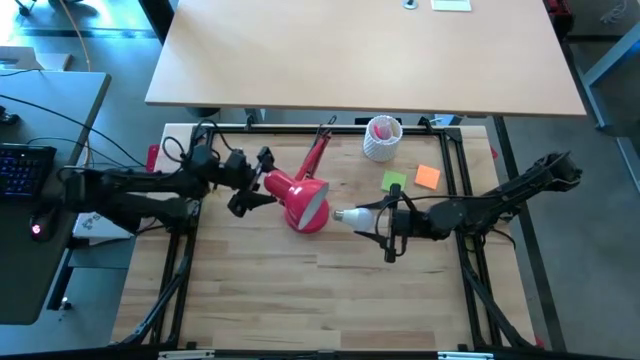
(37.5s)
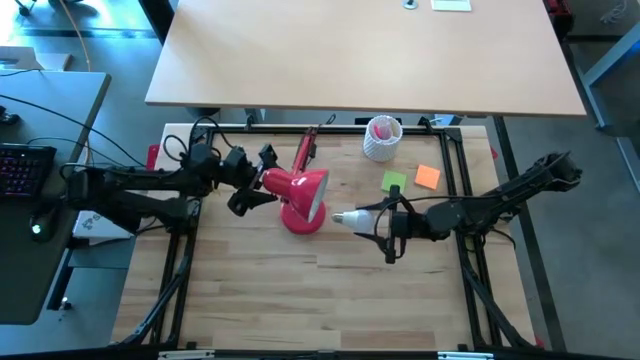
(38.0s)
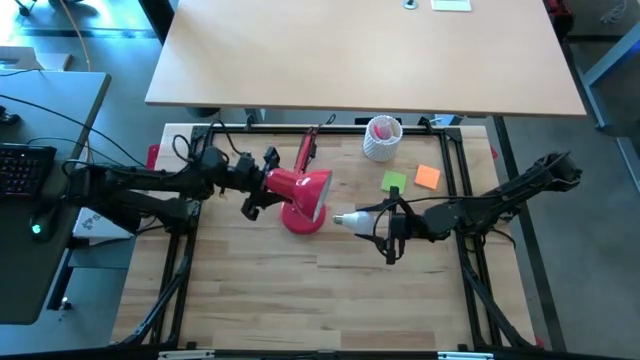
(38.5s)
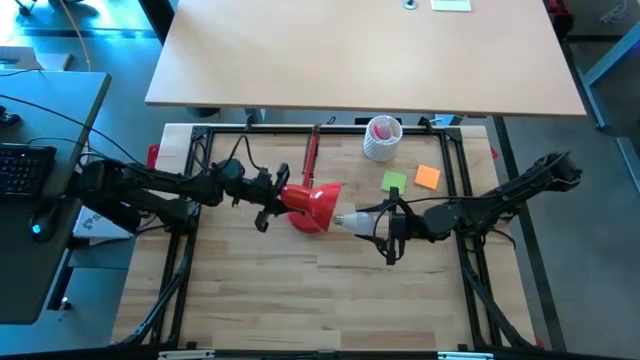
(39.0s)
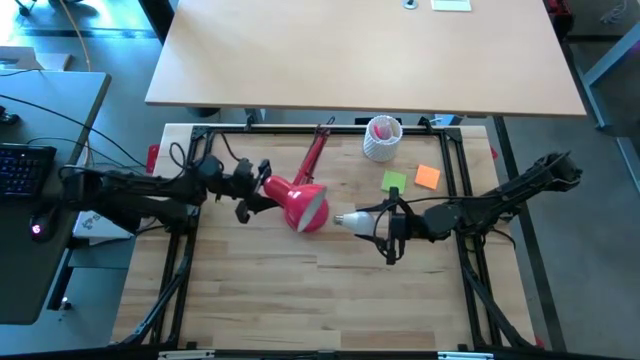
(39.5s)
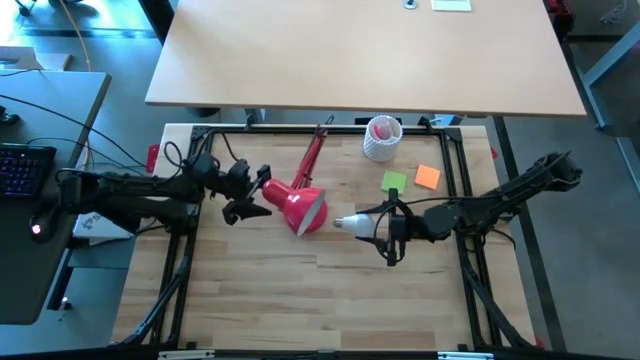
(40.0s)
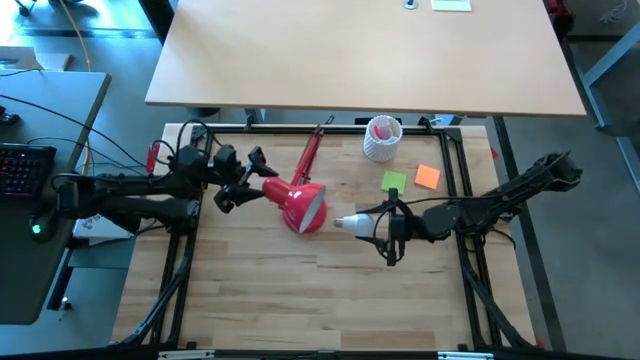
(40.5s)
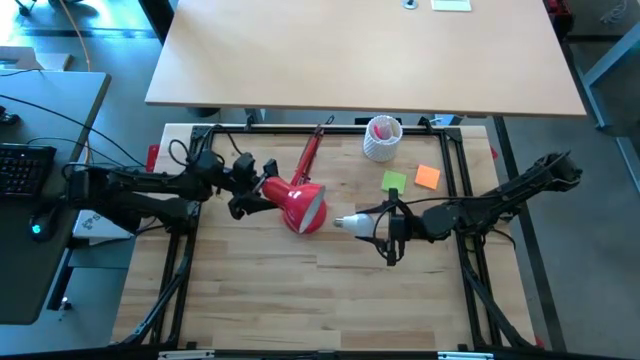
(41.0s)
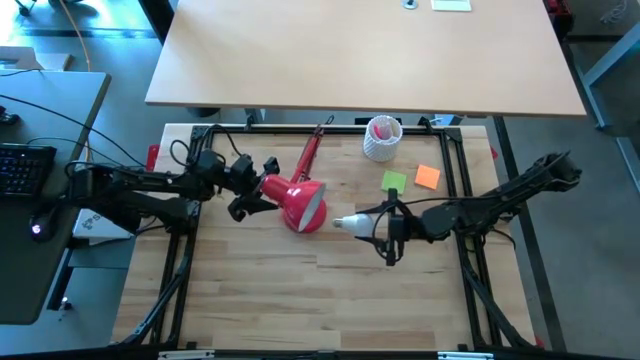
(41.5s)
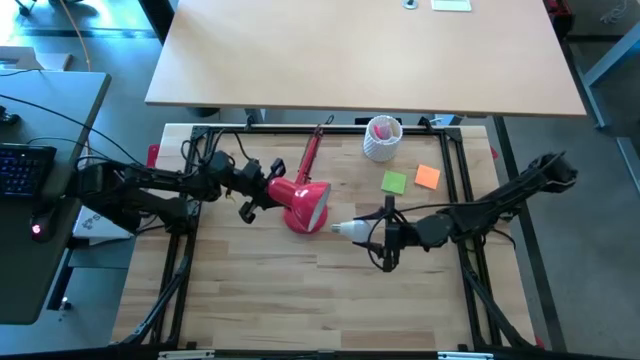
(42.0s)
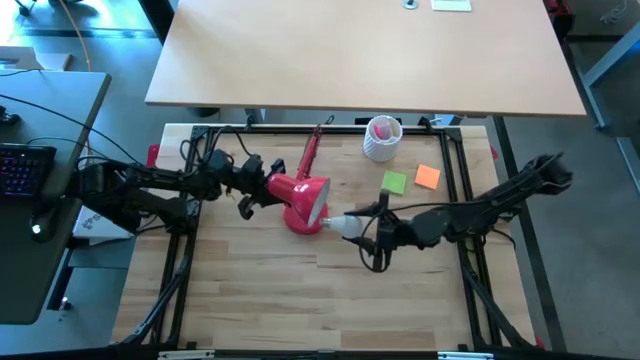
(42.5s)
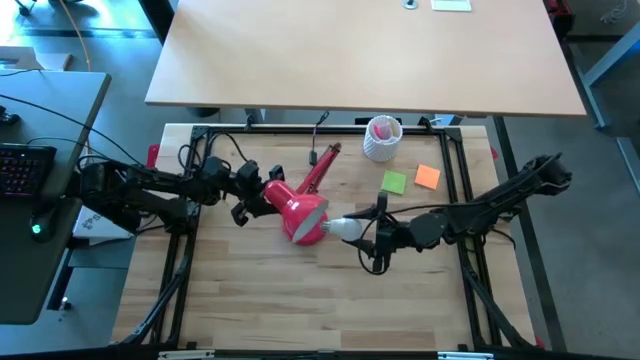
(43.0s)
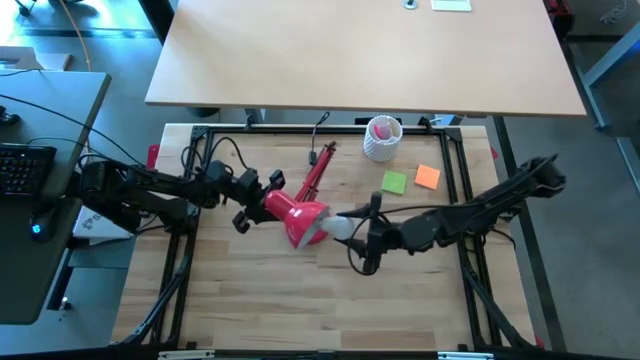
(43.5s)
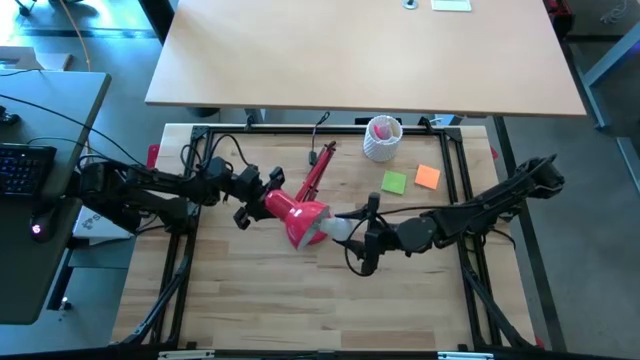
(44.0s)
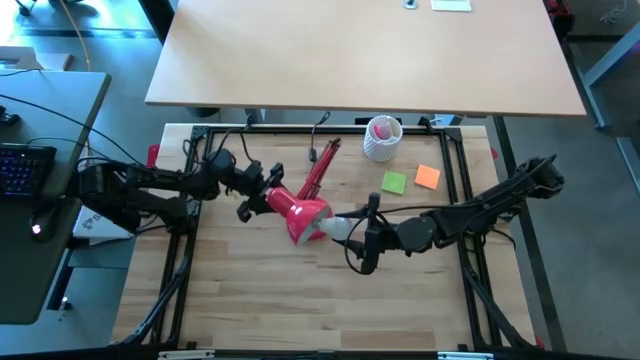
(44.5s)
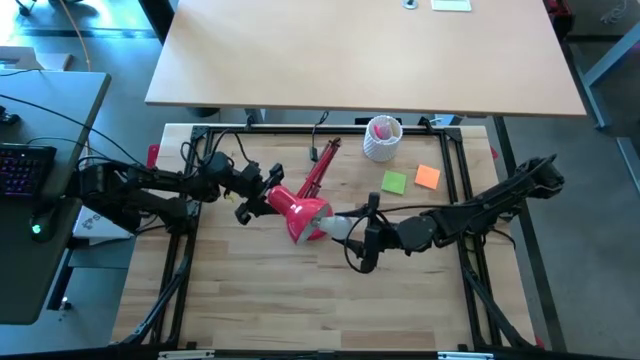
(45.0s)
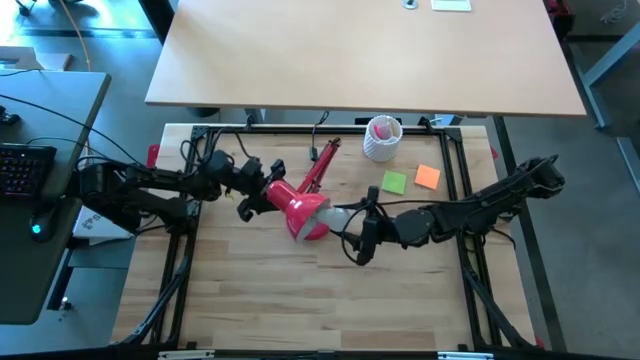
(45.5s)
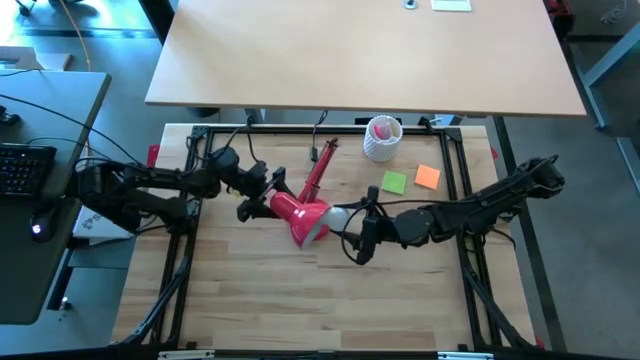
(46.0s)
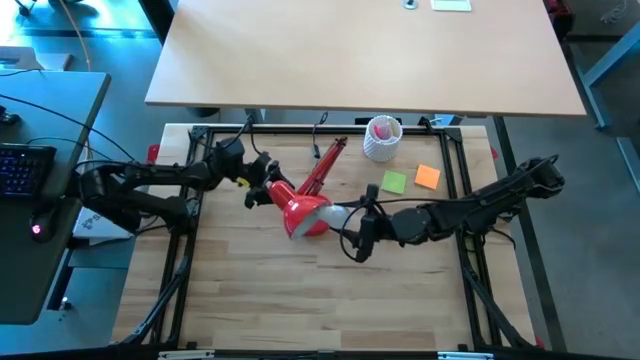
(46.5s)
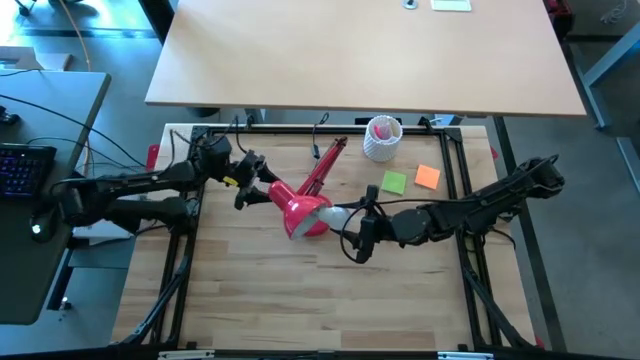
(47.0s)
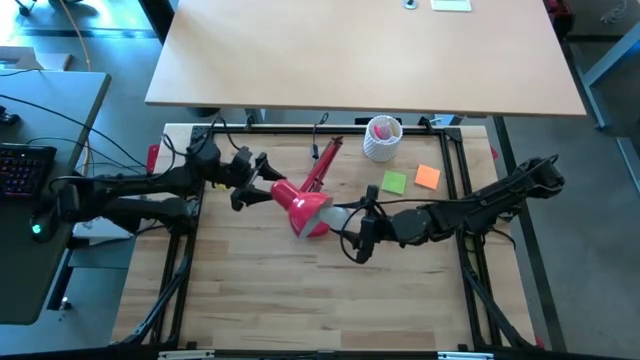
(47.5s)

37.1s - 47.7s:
Task: Screw lightbulb
Insert the white lightbulb into the red lamp

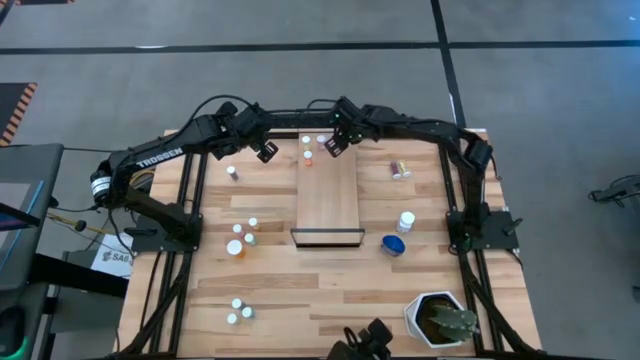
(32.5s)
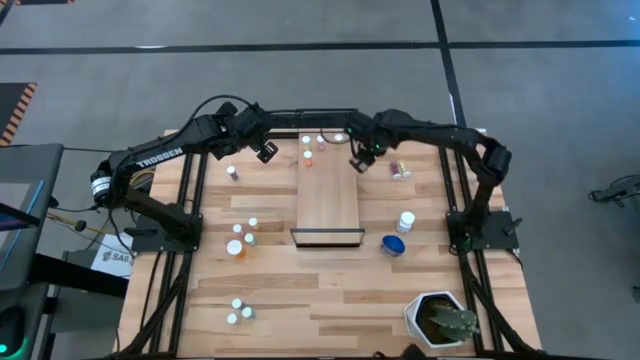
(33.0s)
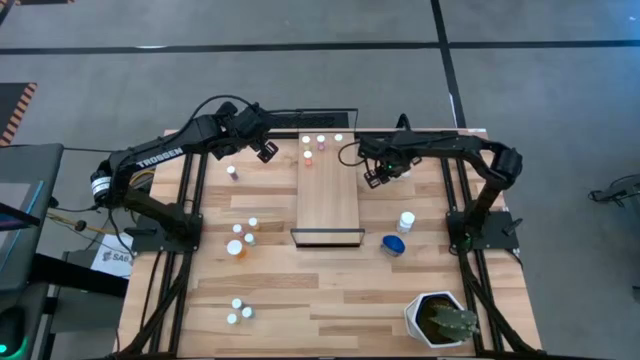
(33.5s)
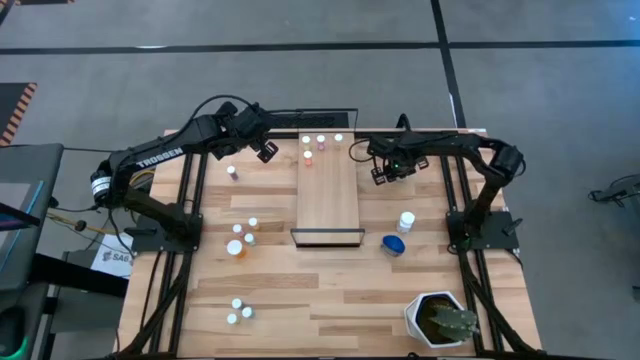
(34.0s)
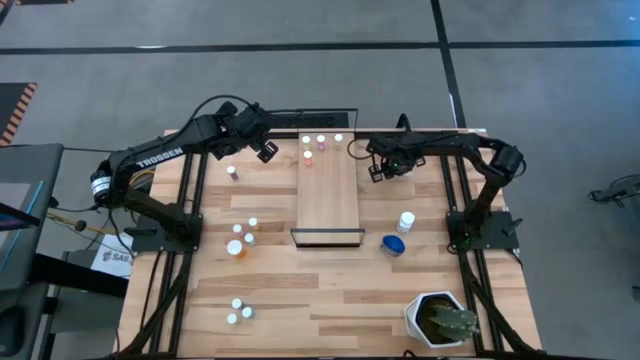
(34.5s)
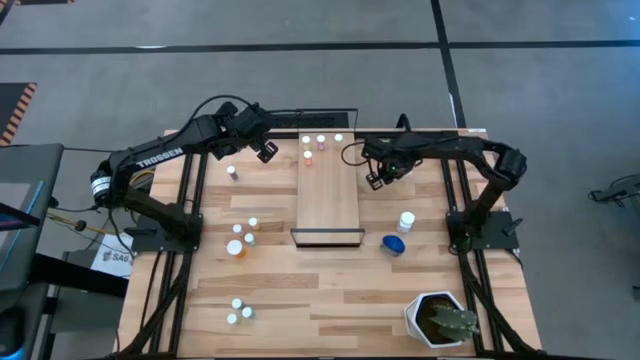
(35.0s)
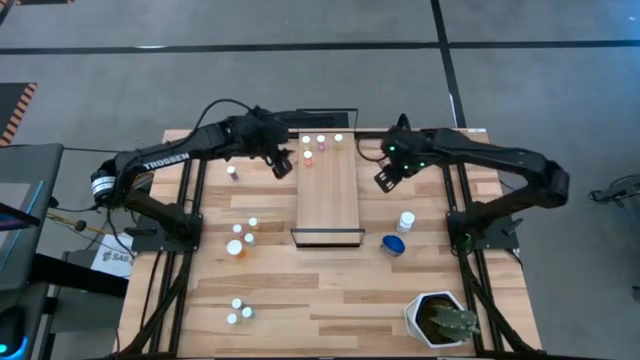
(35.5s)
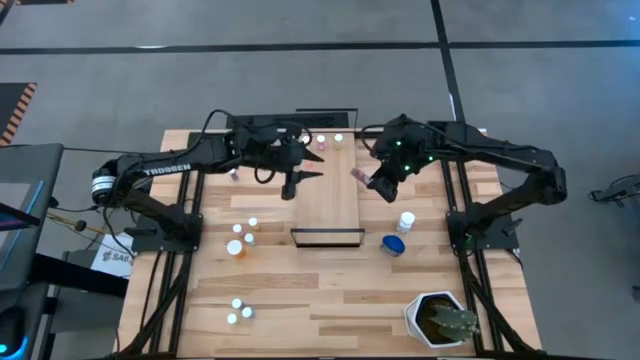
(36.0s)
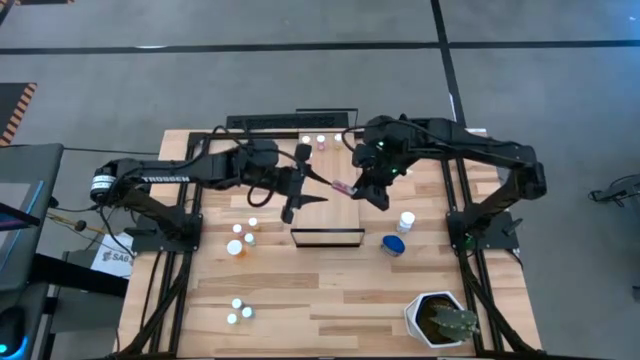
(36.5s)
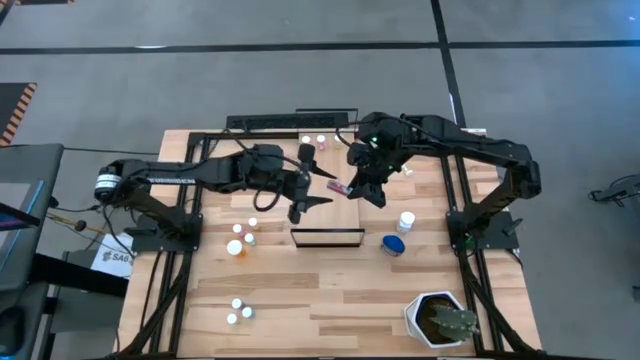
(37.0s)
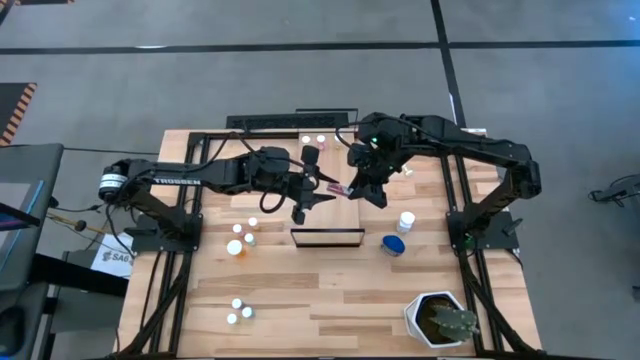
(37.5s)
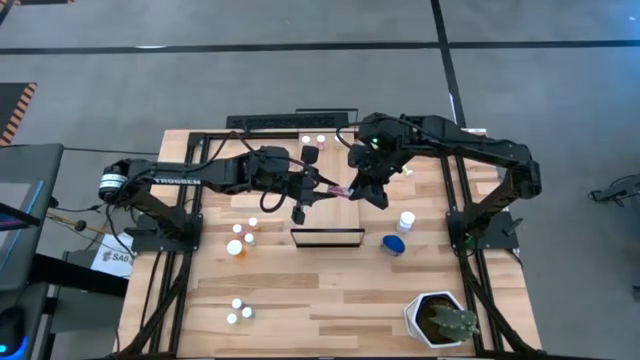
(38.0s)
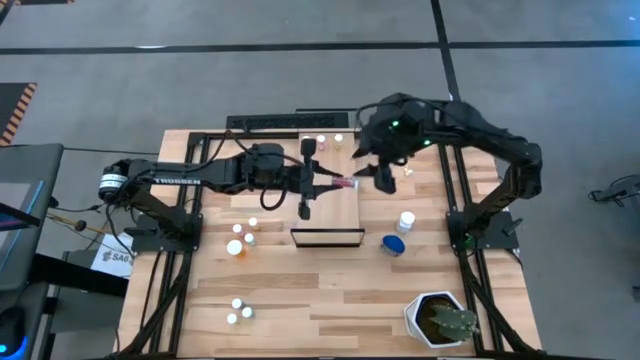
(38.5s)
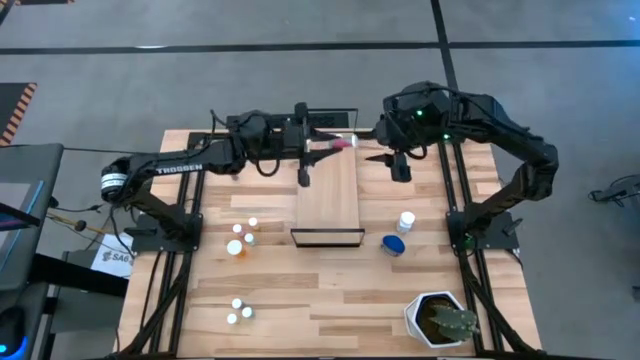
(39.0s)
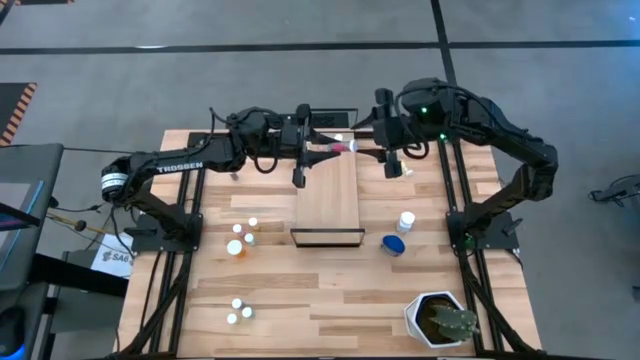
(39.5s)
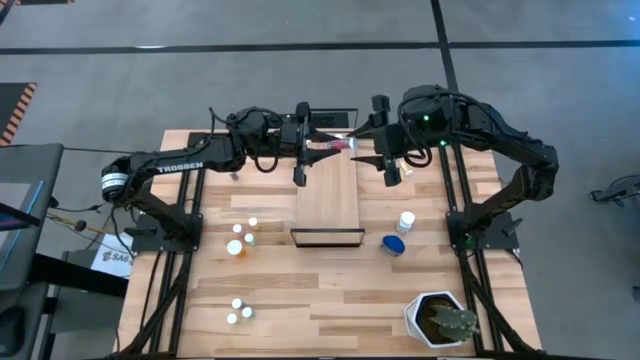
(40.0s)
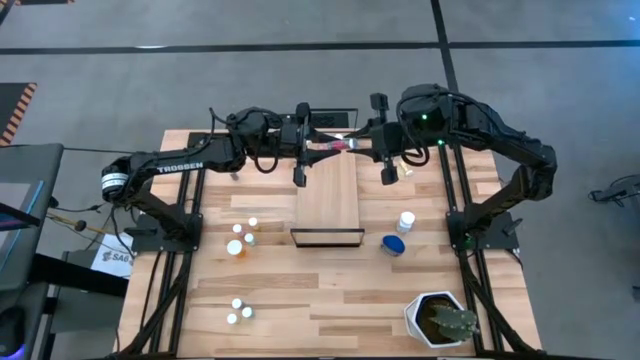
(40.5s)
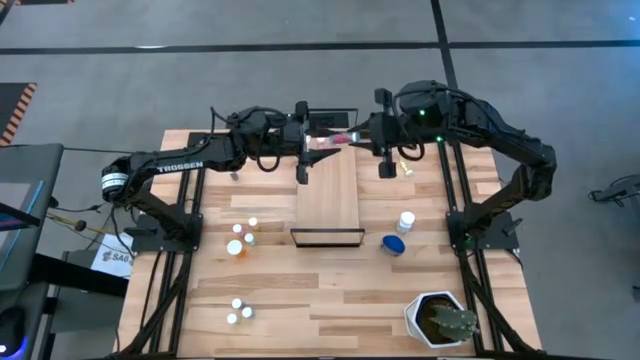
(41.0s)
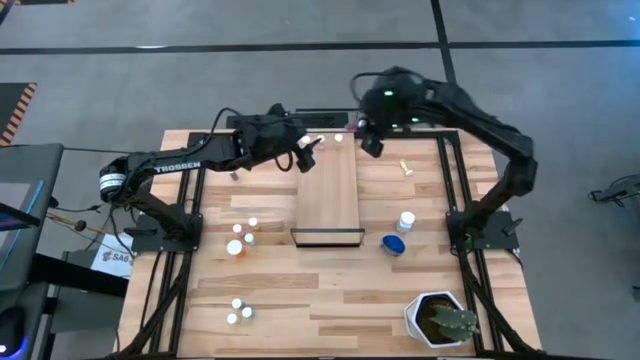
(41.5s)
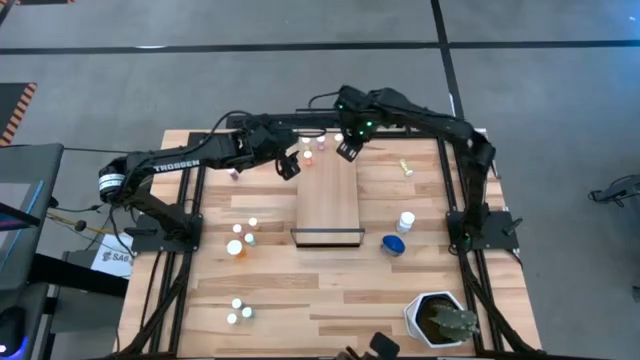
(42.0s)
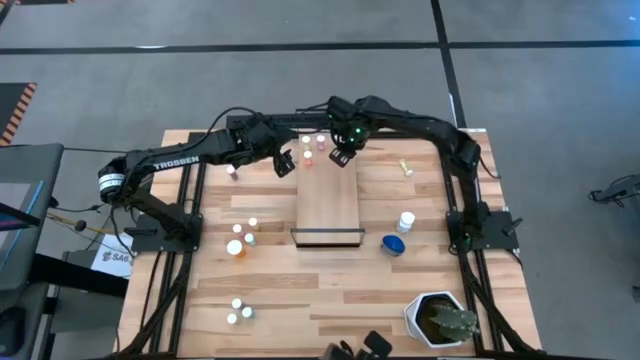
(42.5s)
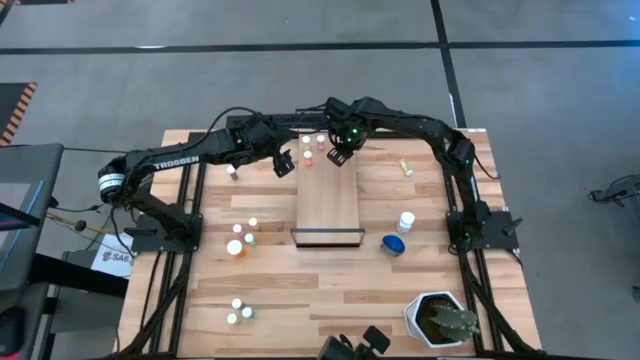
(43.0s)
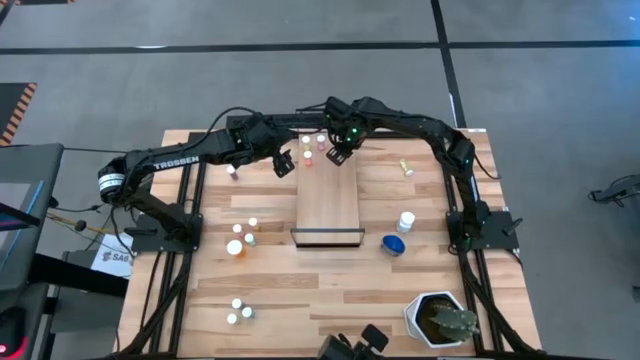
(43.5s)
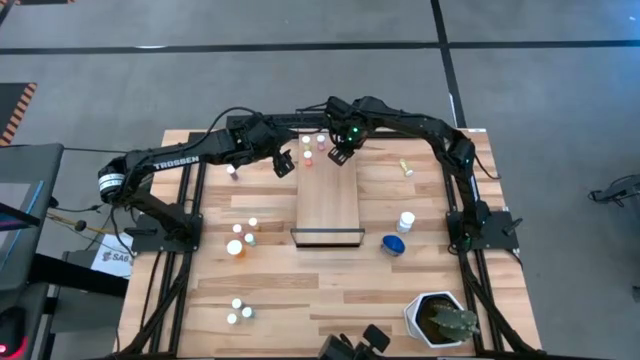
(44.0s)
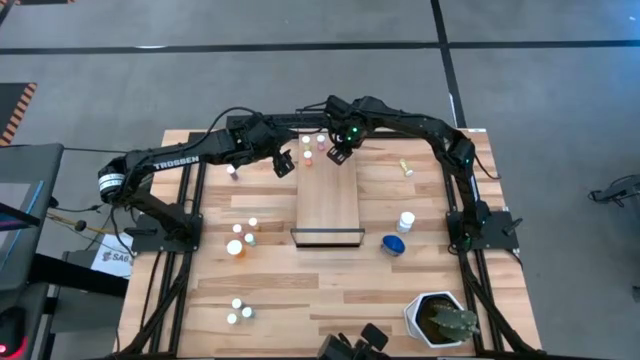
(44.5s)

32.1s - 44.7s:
Task: Pick and place medicine bottles onto shelf by color
Put the blue pill bottle on the shelf
